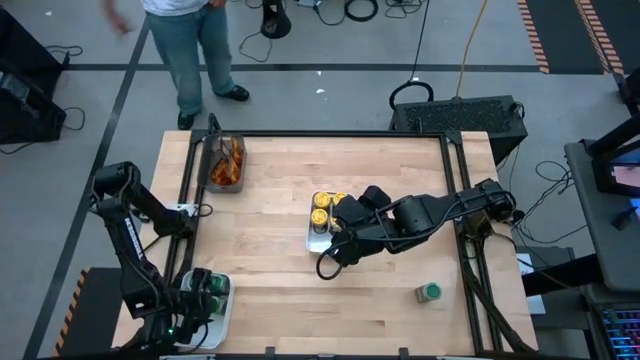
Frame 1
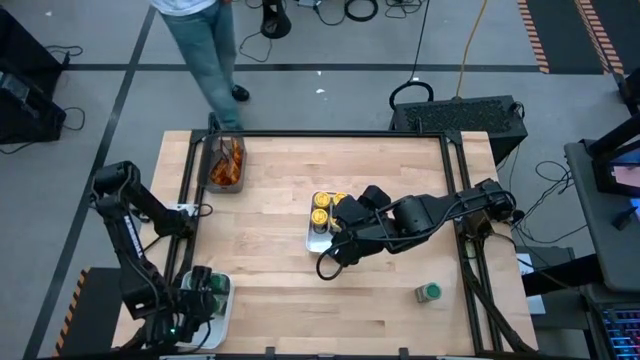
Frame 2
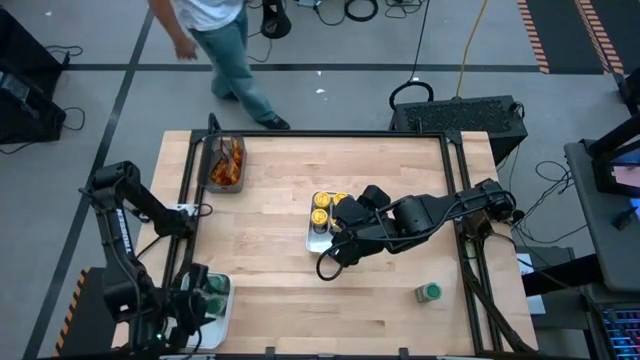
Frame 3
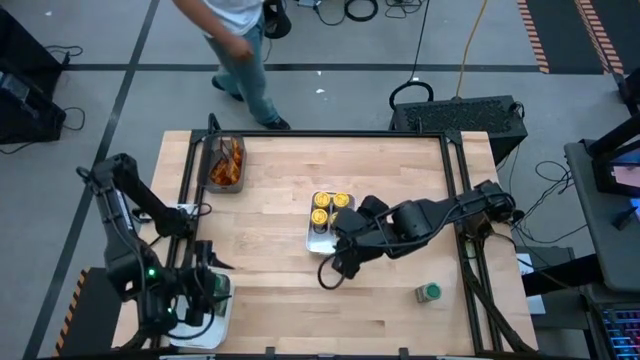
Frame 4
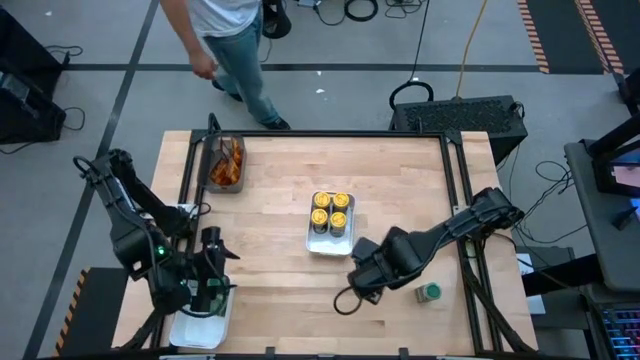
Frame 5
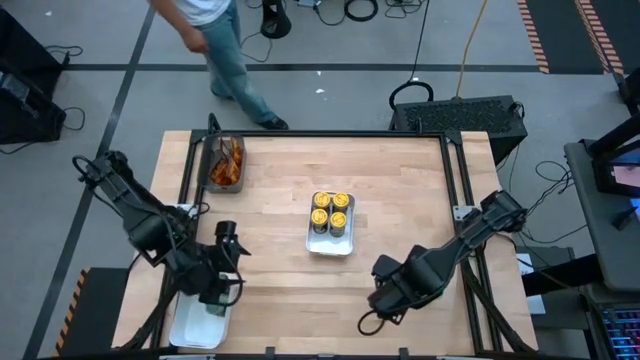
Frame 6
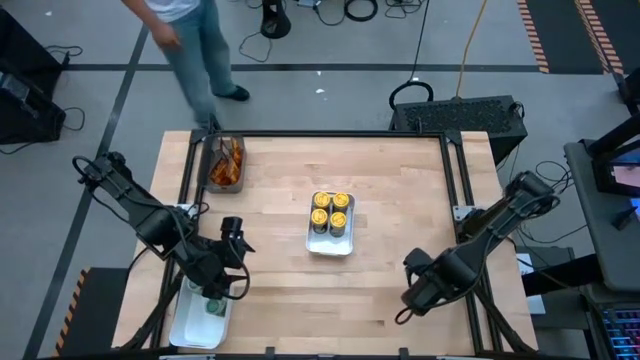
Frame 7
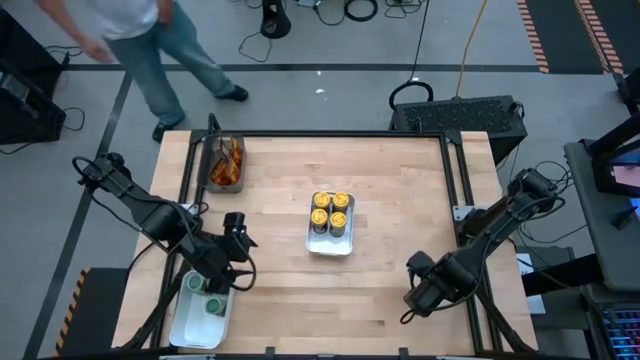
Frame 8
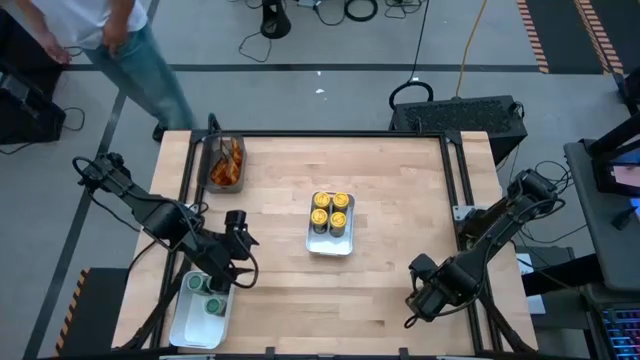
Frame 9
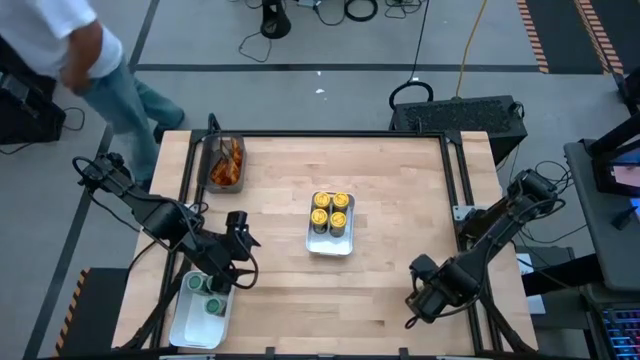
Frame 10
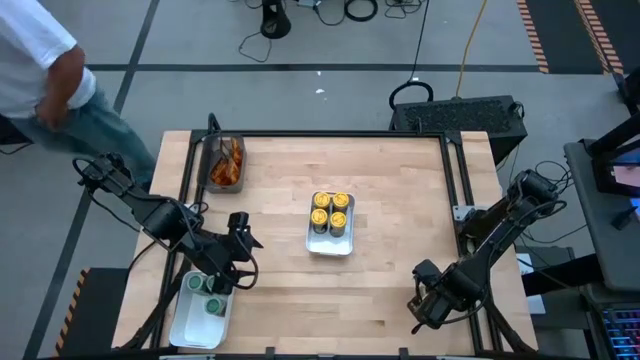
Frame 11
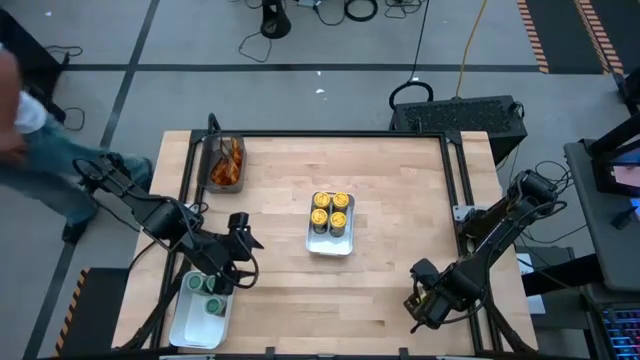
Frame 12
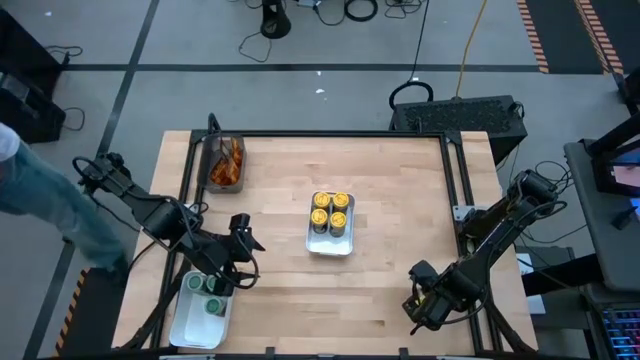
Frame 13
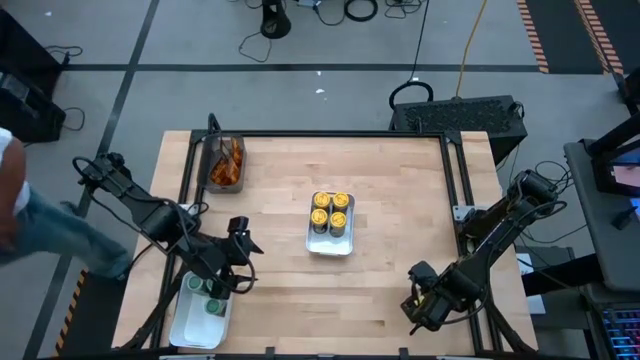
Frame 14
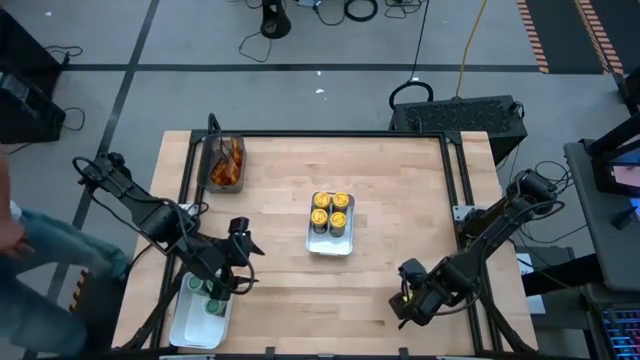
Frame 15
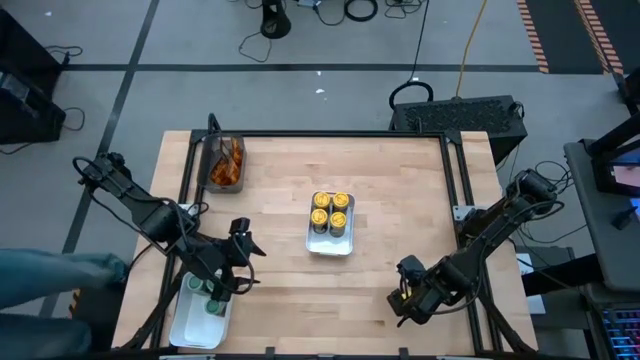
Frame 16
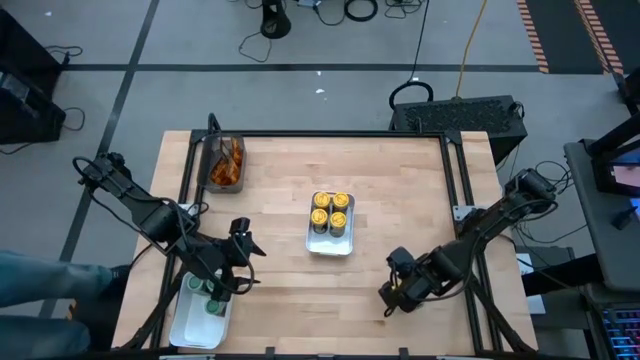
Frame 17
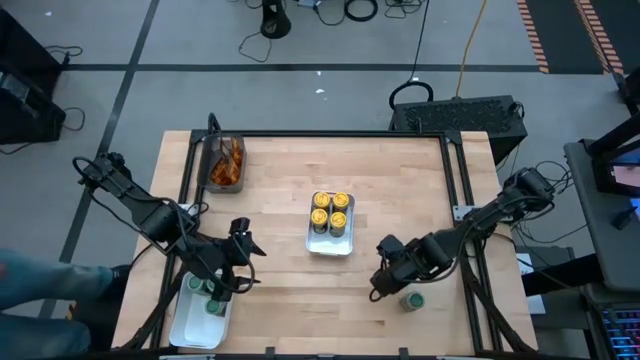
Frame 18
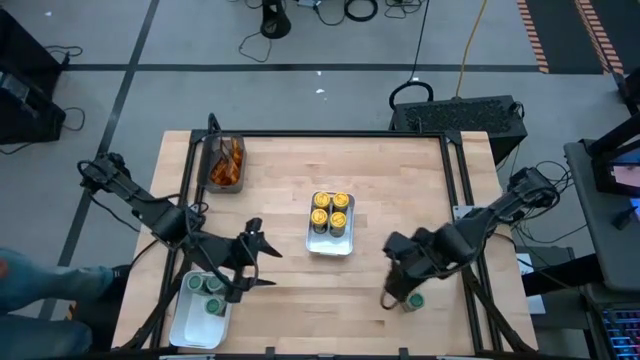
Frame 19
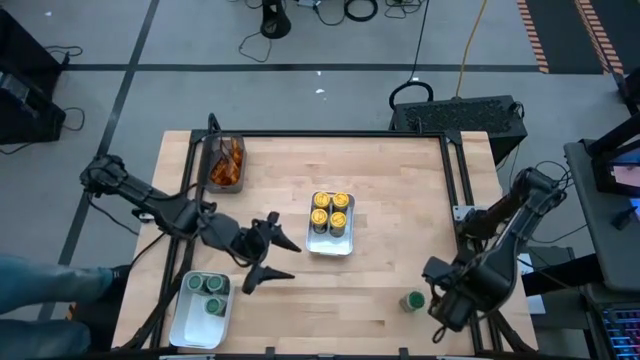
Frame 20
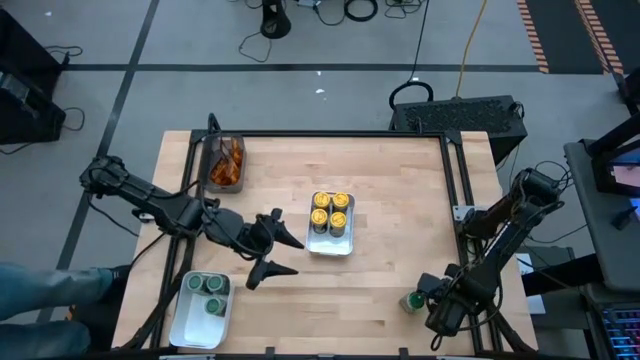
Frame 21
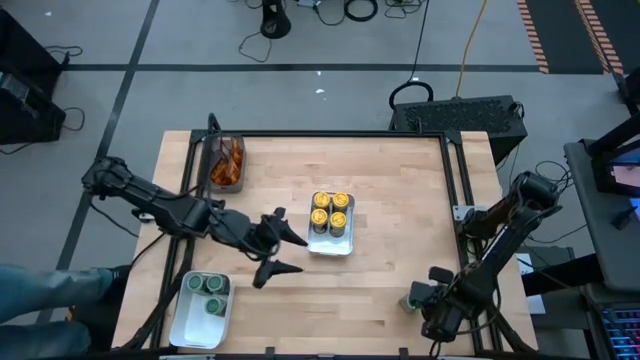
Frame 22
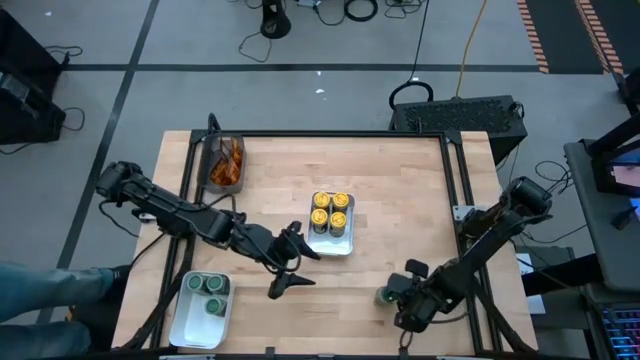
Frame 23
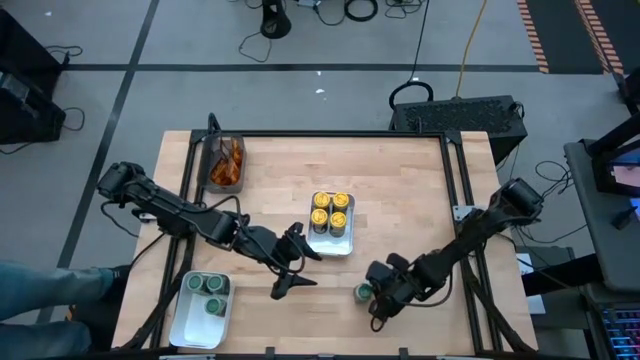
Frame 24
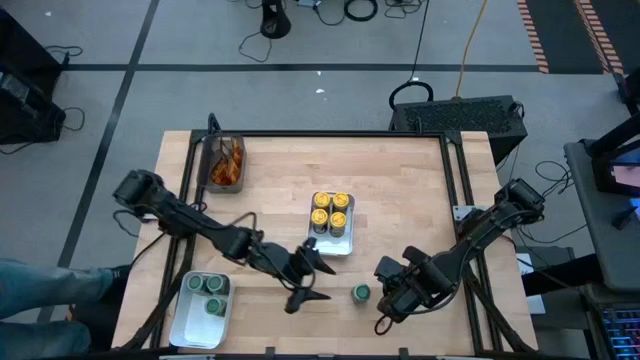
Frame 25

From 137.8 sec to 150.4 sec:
Task: Sort spices by type
Put the green spice bottle into the bottom white bin
